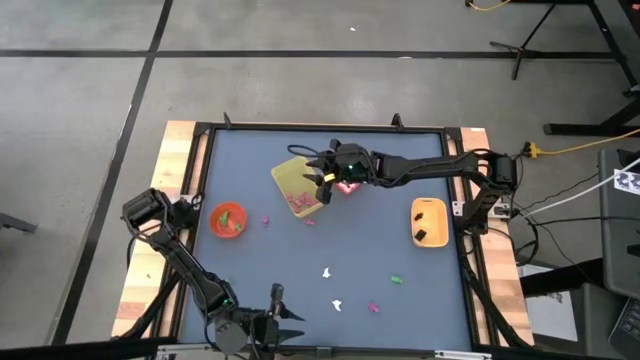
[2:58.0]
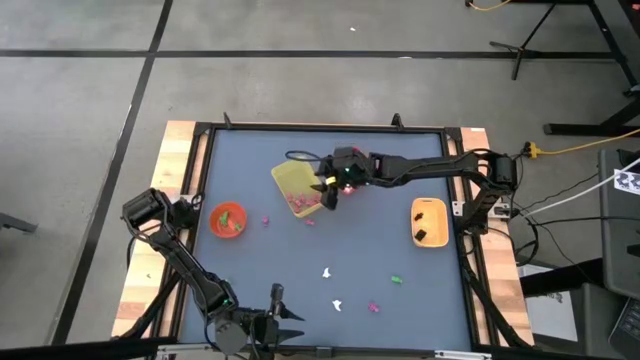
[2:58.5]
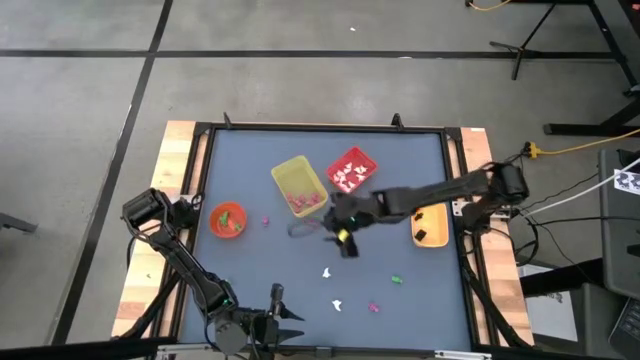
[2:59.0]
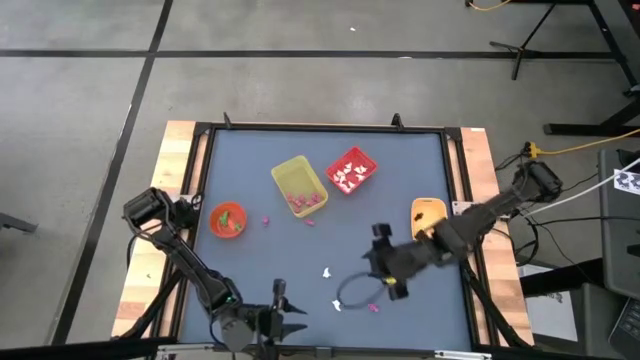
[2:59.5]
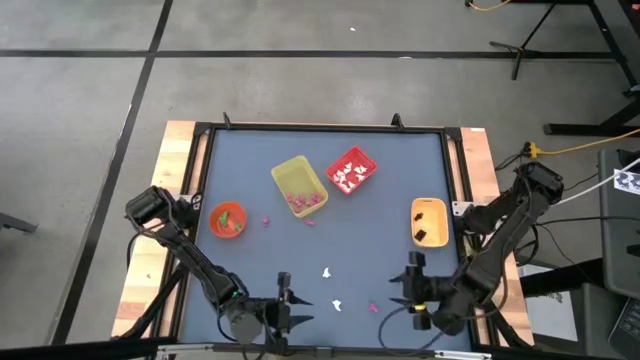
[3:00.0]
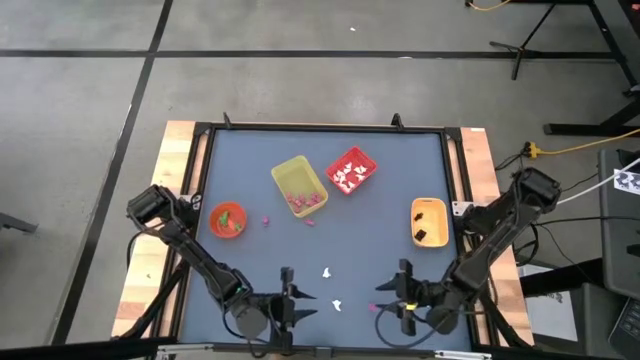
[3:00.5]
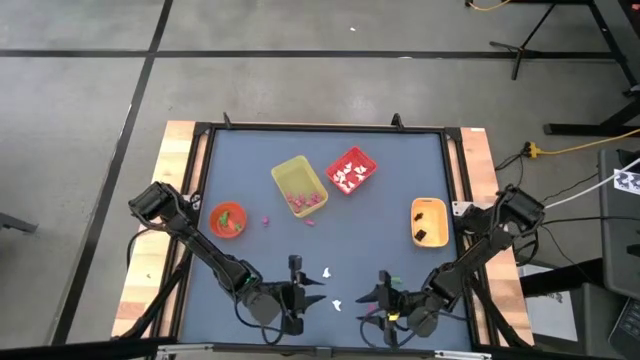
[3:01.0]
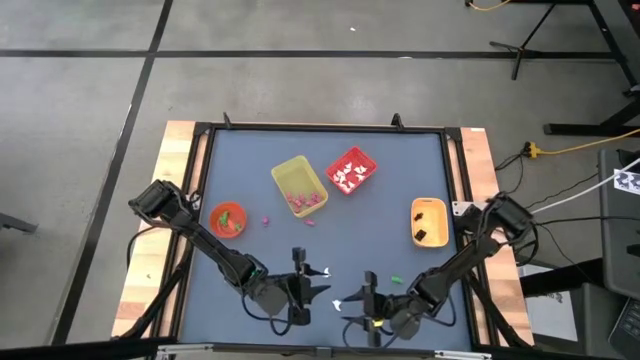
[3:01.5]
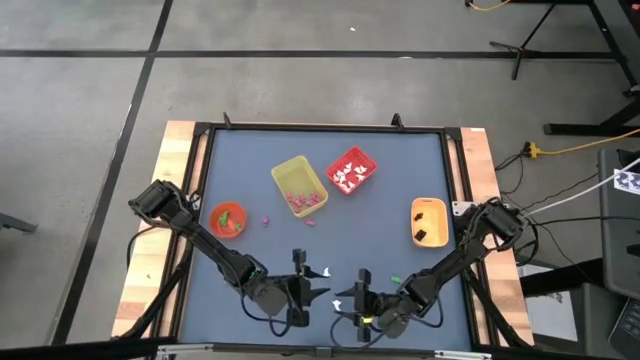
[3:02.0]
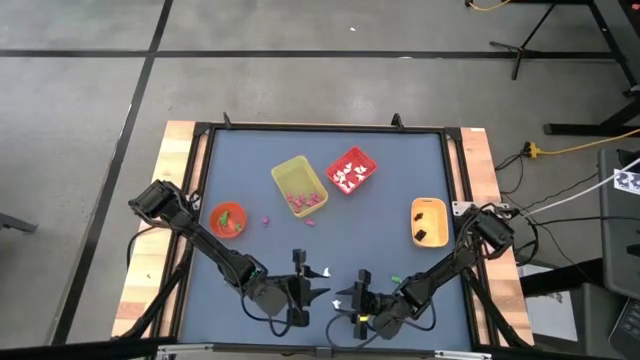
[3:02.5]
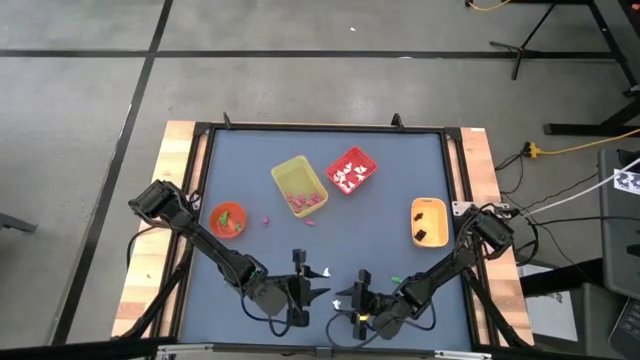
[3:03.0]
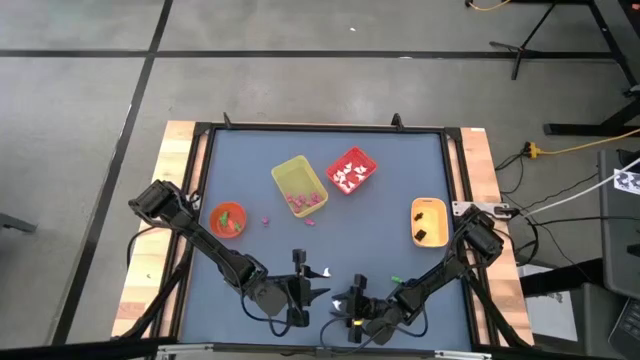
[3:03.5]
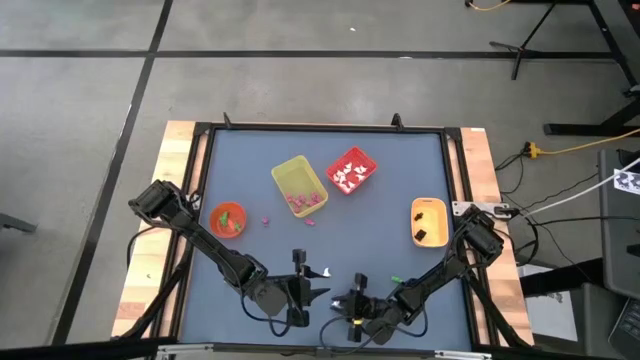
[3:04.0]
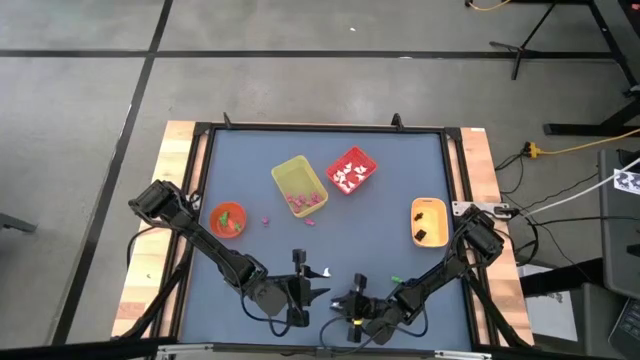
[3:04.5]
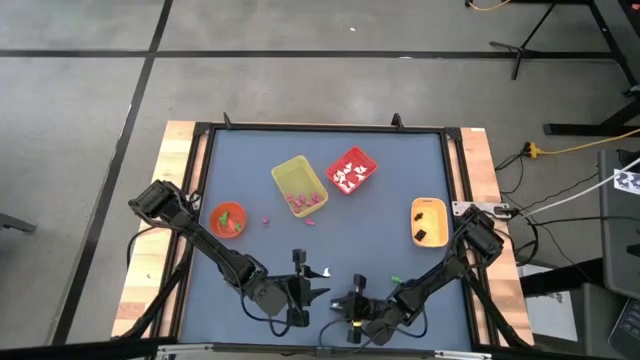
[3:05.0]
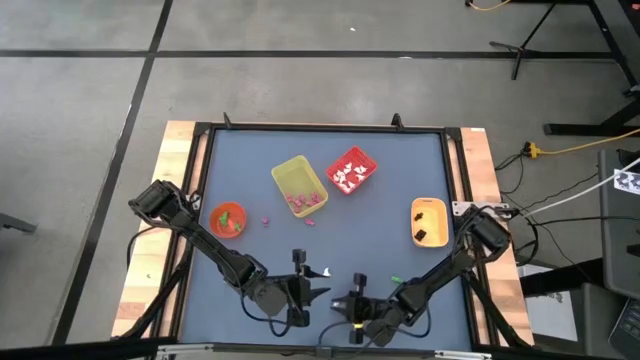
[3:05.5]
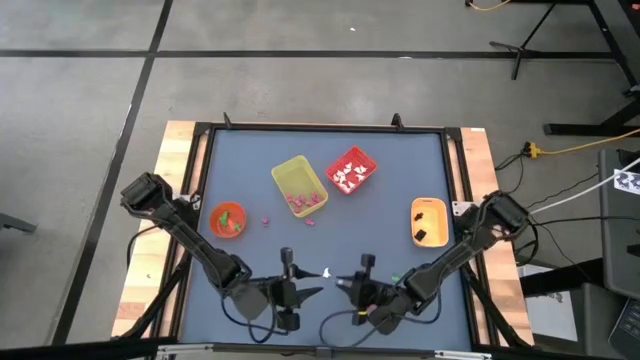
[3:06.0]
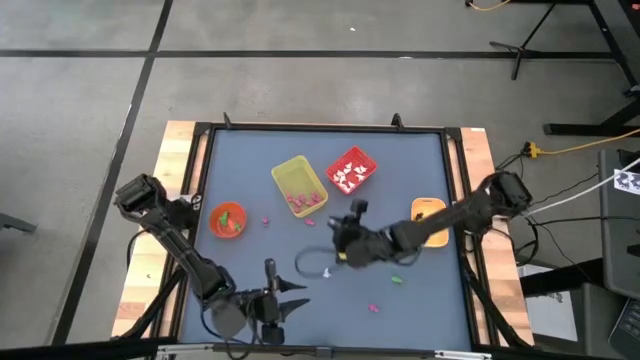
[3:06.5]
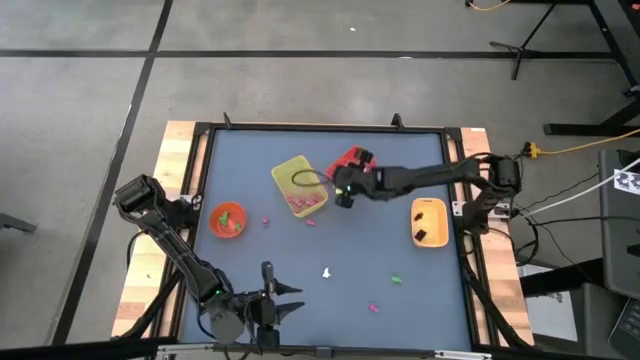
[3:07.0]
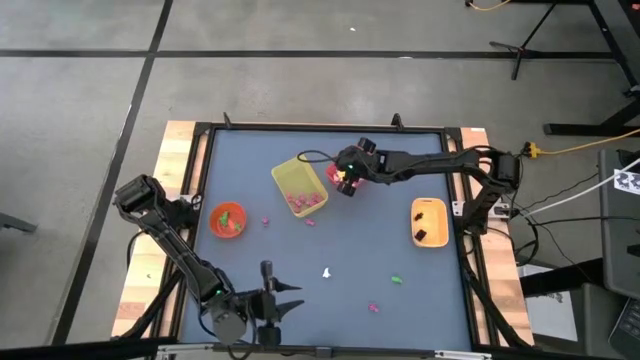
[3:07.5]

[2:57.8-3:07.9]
Task: Sort Halloween decoration
Put the white ghost toy into the red bin

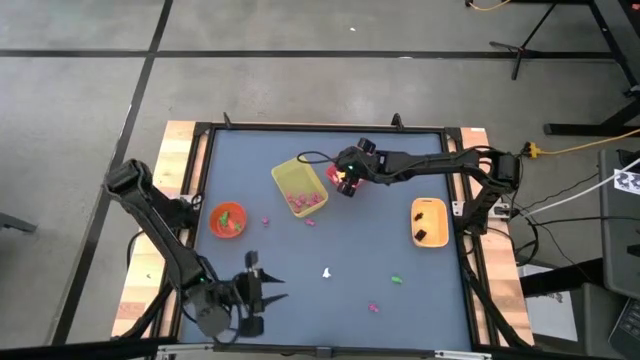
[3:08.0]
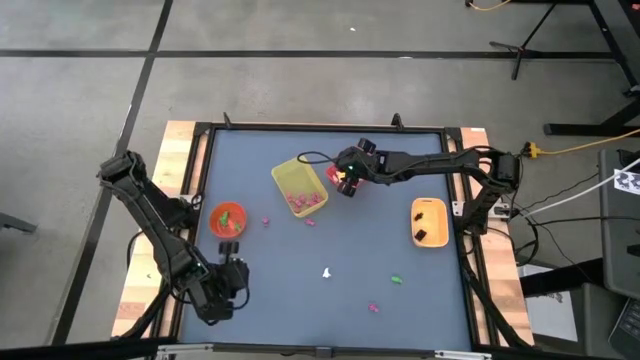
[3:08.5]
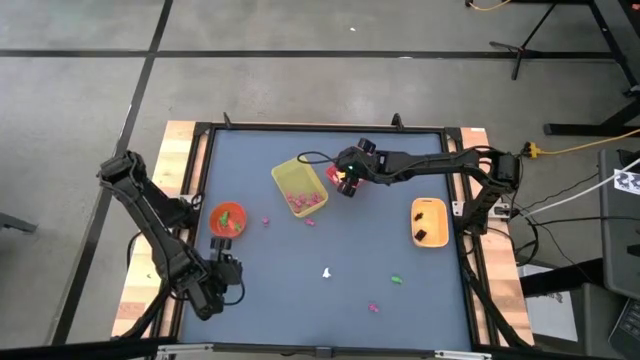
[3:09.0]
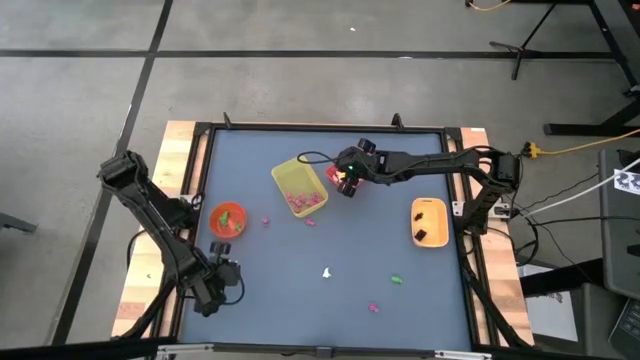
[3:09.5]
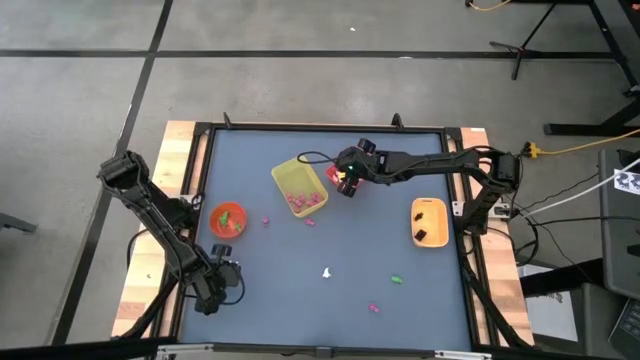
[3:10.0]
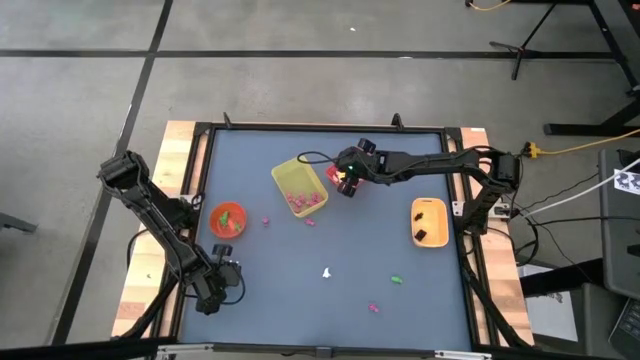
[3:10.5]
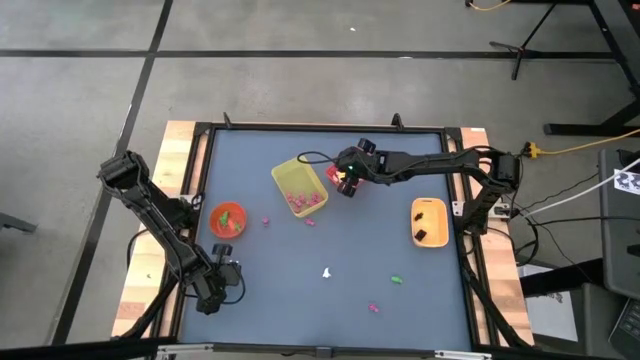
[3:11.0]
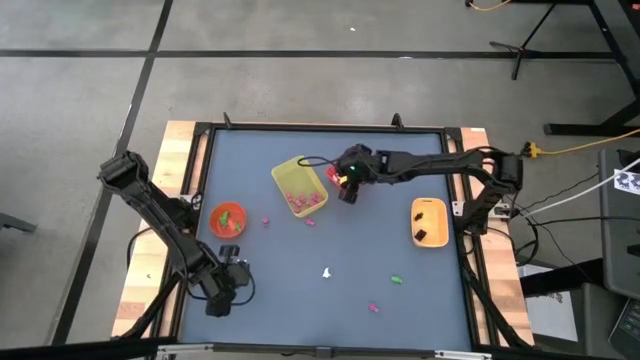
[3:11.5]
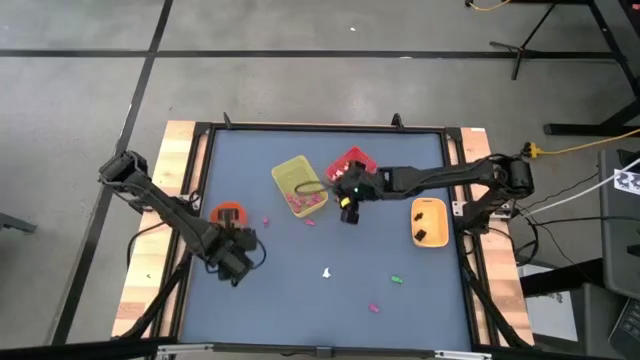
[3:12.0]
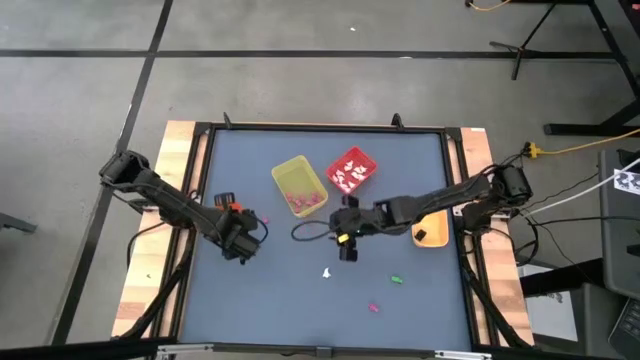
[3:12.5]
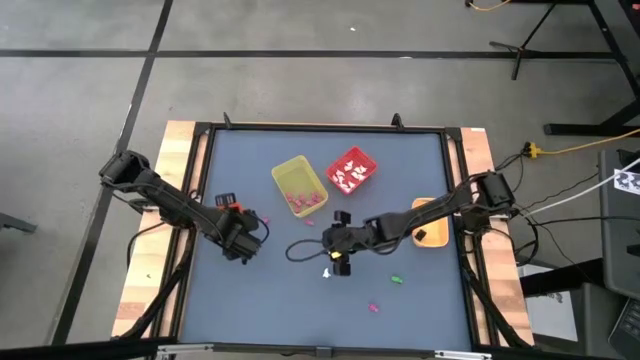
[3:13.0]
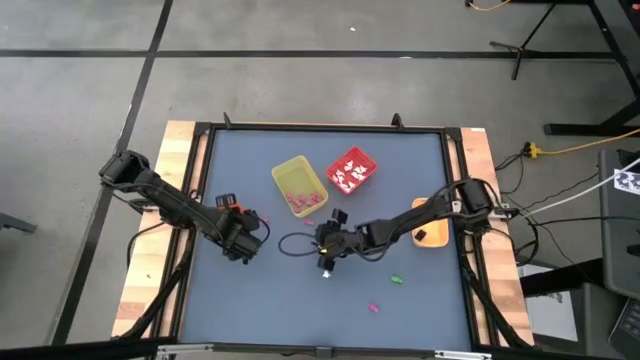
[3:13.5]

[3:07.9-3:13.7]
Put the green skeleton toy into the orange bin

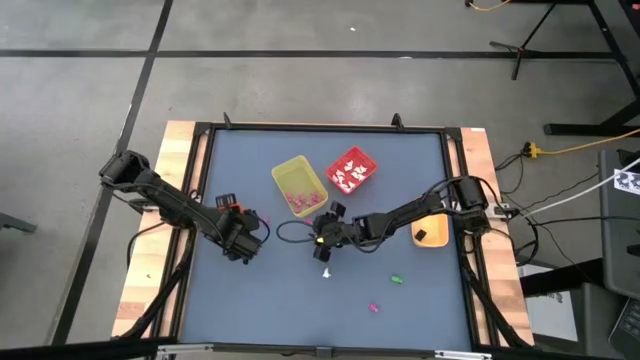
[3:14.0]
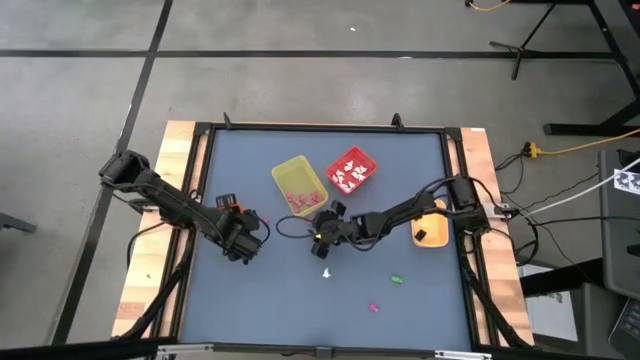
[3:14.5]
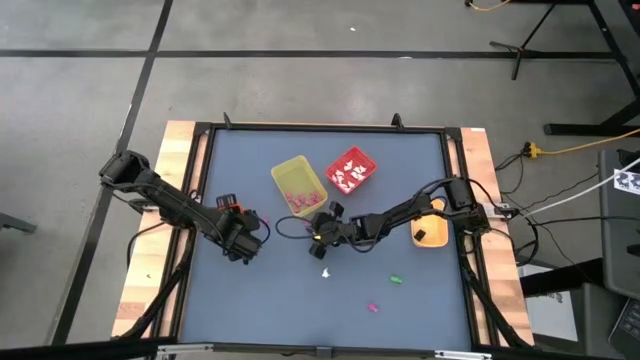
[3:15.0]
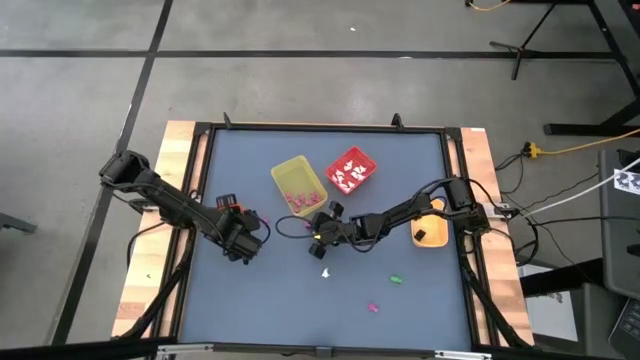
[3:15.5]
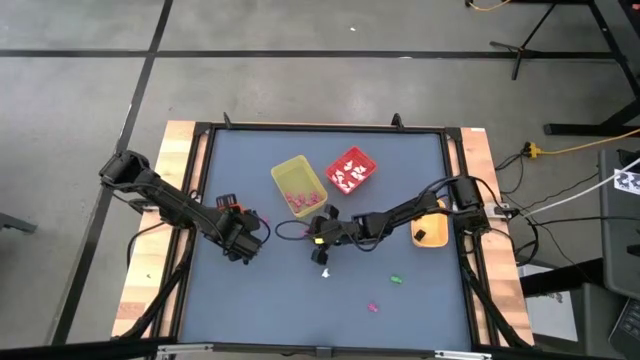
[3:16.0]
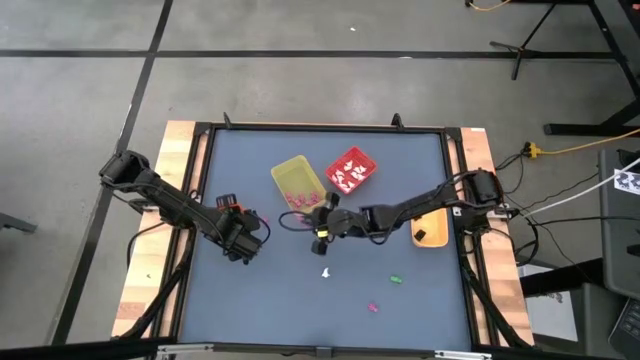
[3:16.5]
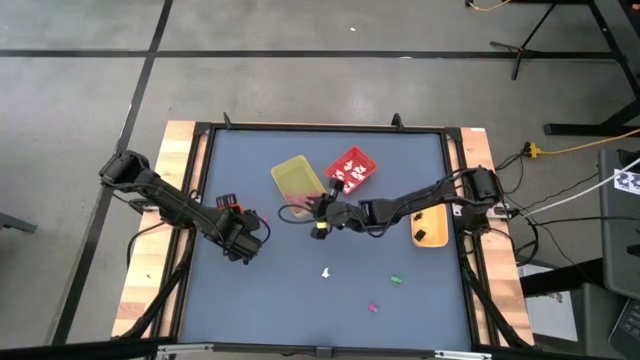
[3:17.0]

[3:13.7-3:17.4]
Put the pink skeleton toy into the yellow bin

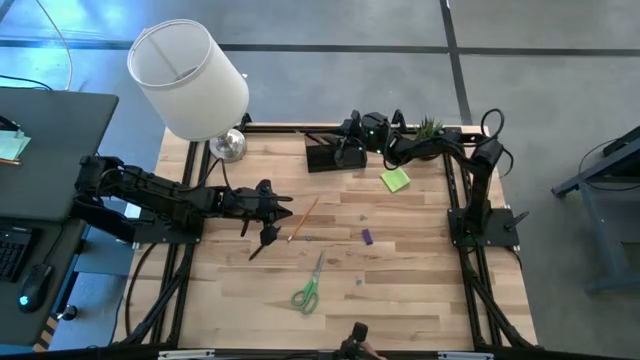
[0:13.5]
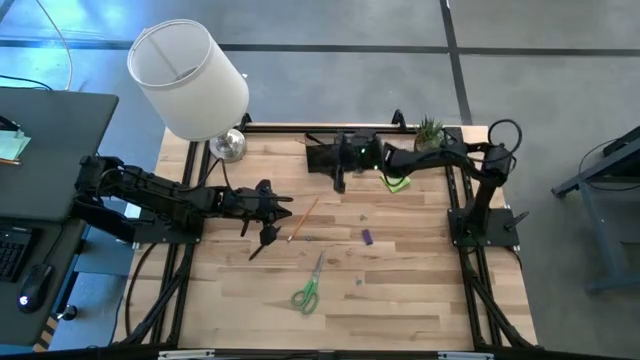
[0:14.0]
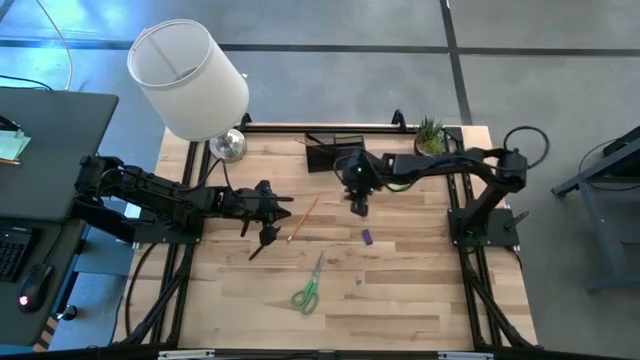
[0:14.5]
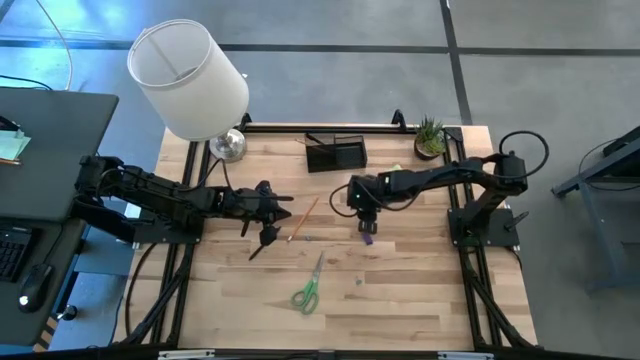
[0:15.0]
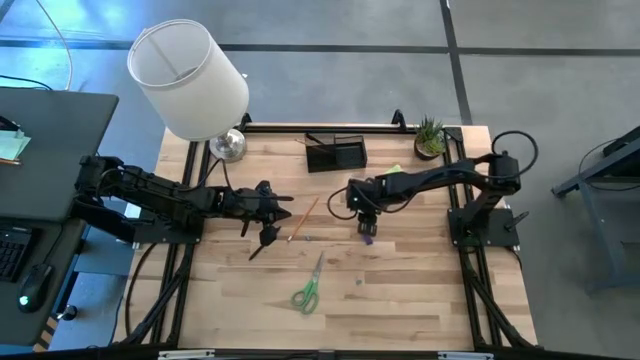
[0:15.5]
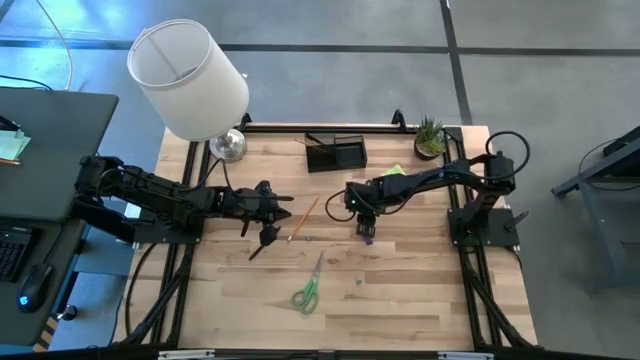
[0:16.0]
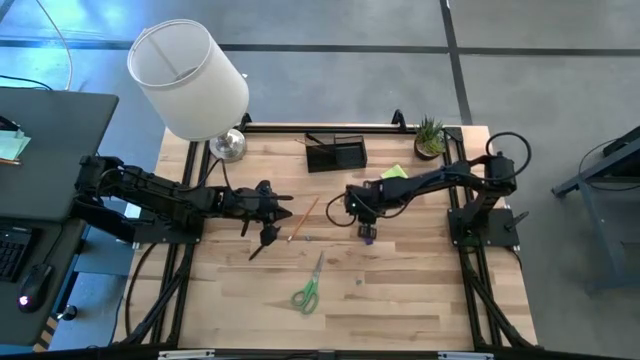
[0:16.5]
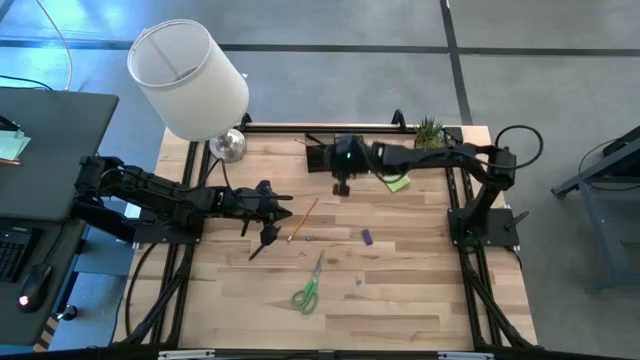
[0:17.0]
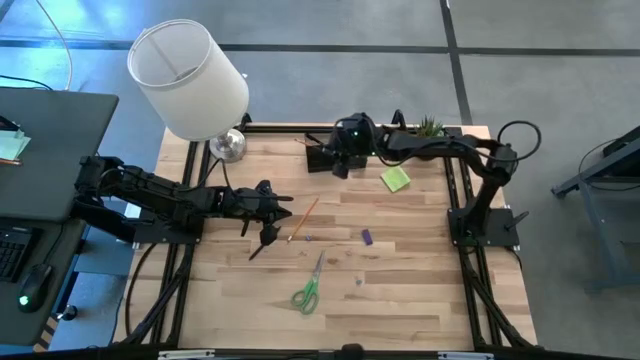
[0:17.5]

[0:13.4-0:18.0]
Task: Pick and place office supplies into organizer
Put the top right blue binder clip into the black desk organizer
